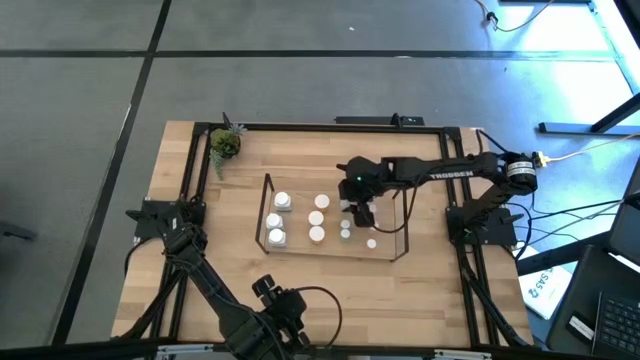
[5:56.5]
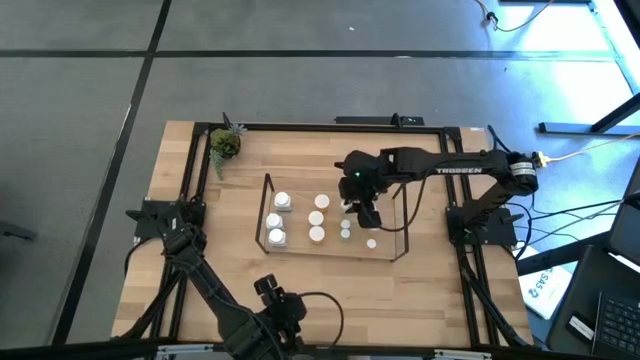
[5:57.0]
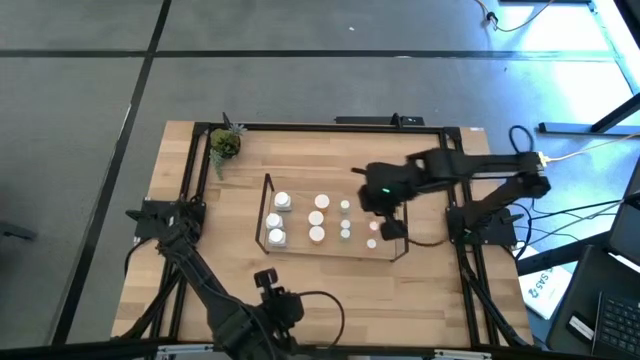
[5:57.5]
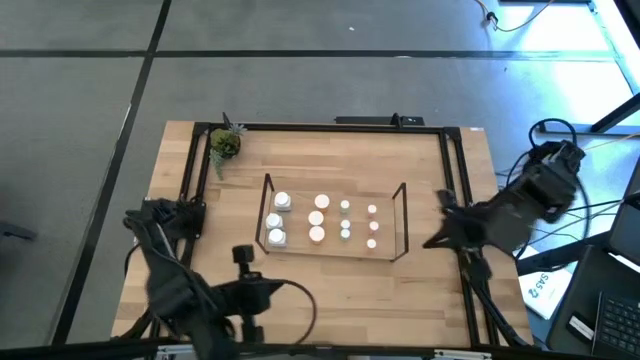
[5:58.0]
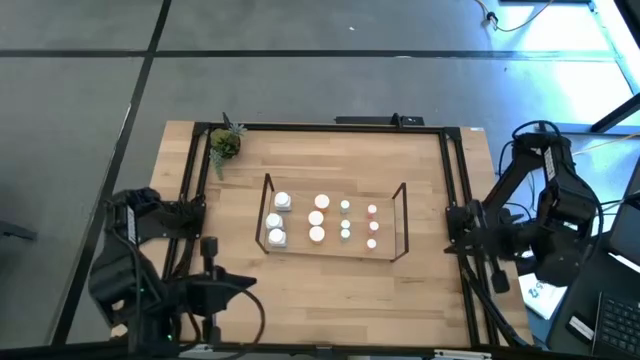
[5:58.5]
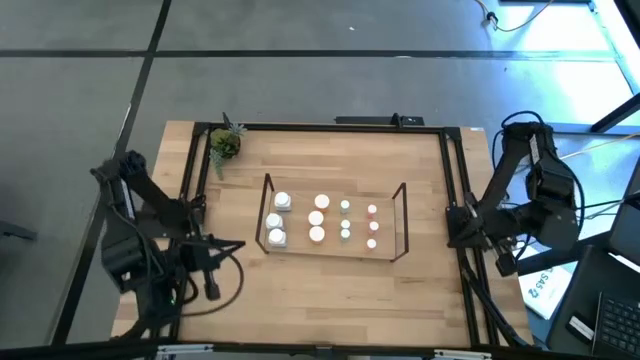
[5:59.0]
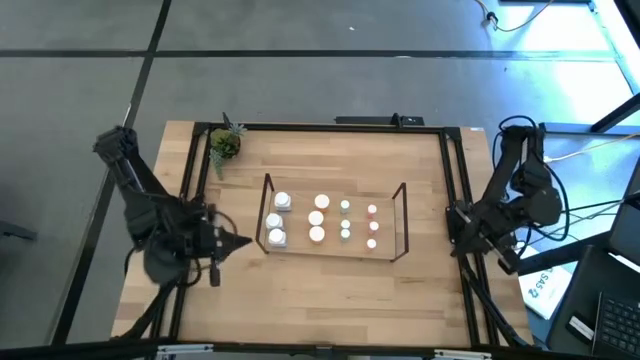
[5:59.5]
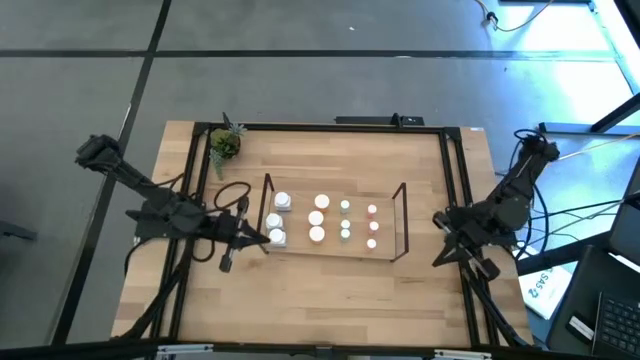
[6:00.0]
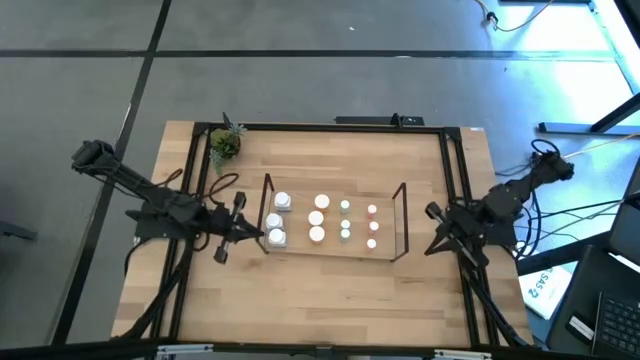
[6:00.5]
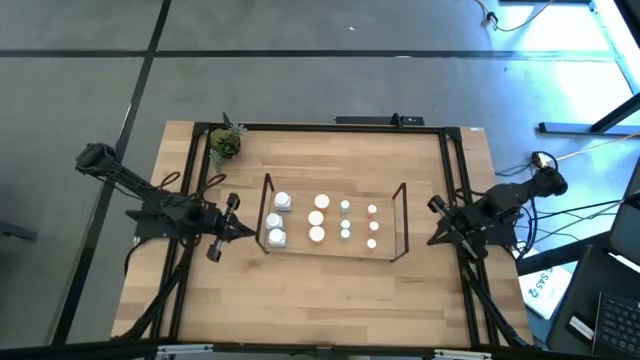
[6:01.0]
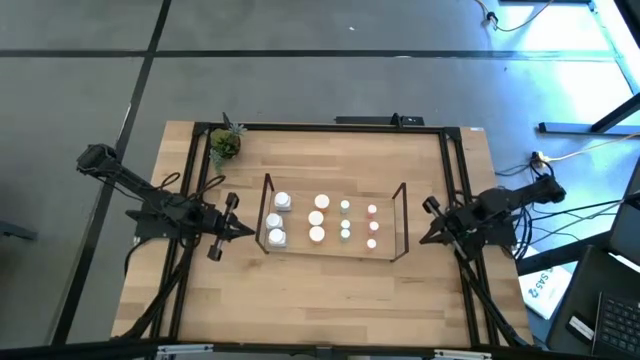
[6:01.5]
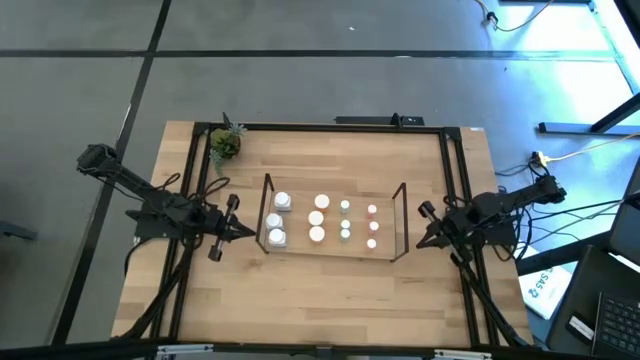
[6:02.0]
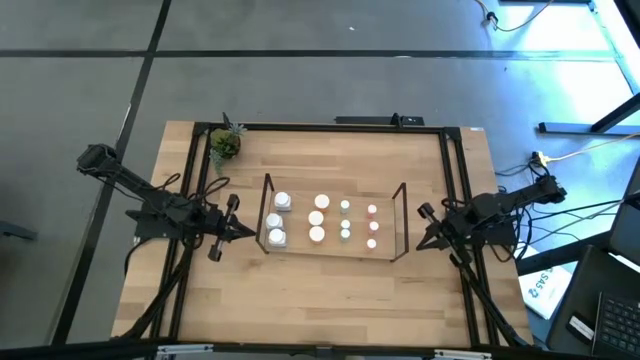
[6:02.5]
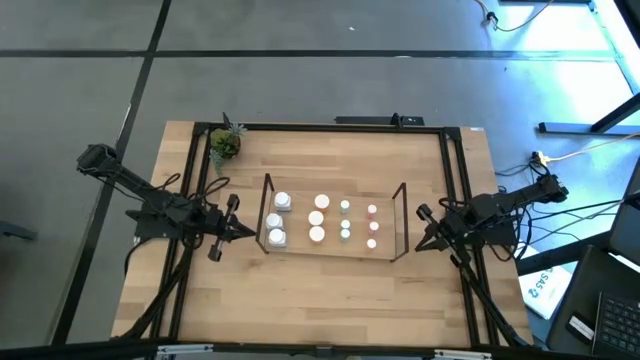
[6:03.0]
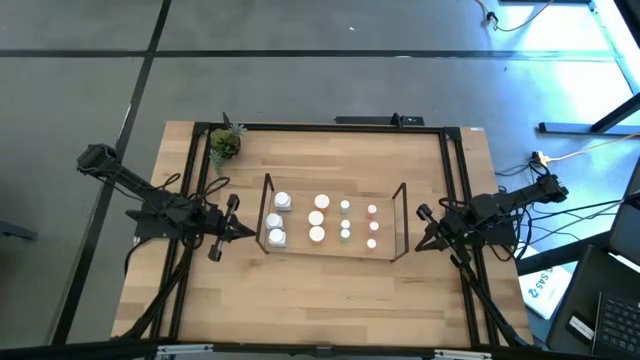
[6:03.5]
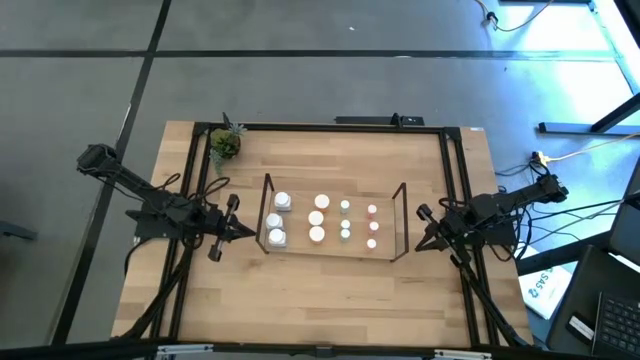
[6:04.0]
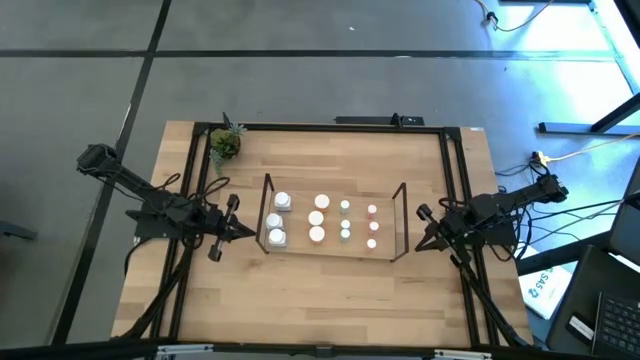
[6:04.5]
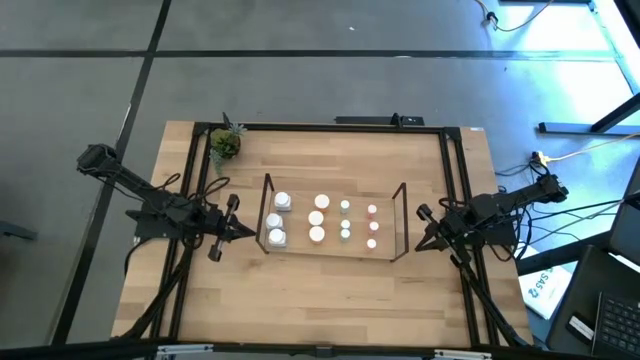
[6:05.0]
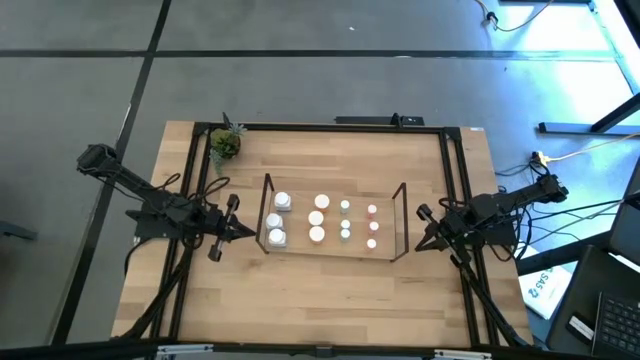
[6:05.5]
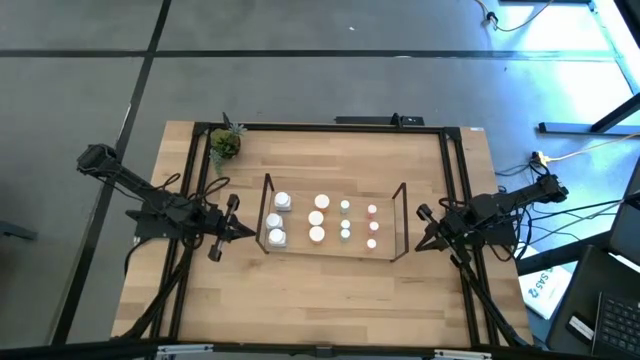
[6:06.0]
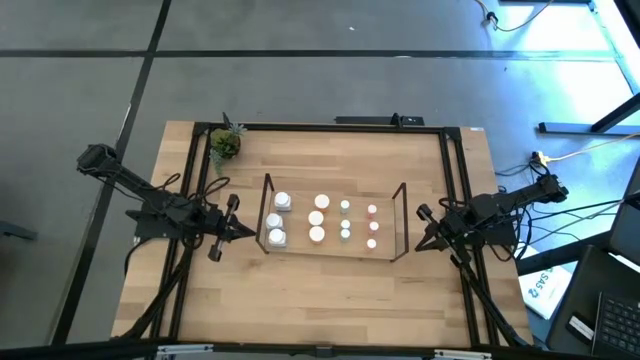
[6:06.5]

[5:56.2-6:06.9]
Task: Pick and place medicine bottles onto shelf by color
Return to Home Position

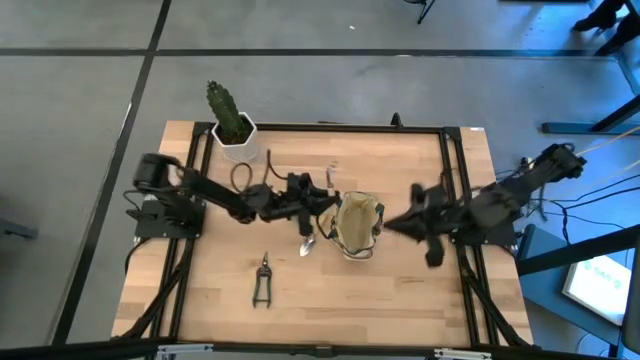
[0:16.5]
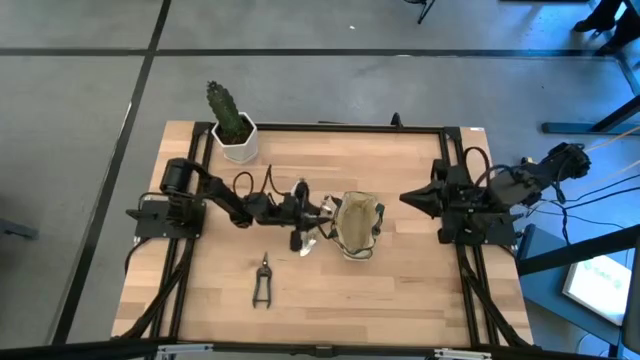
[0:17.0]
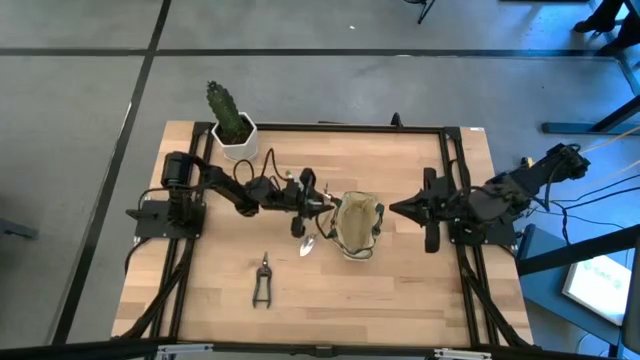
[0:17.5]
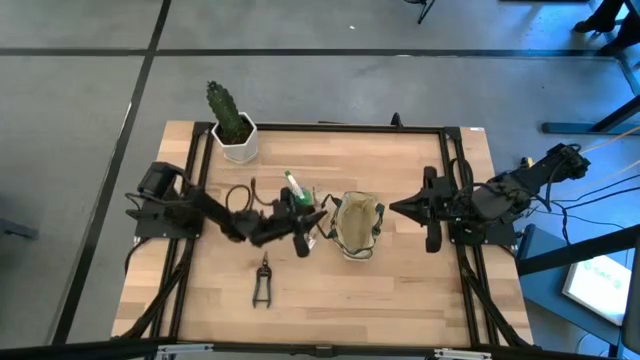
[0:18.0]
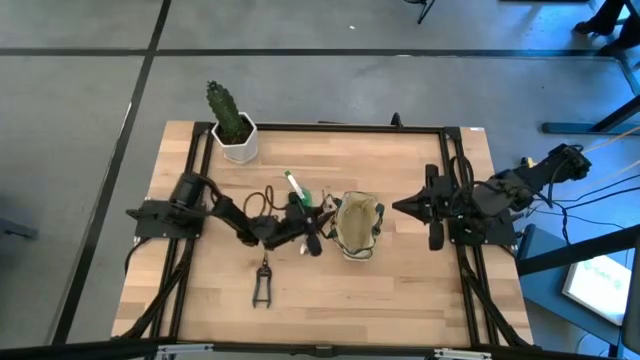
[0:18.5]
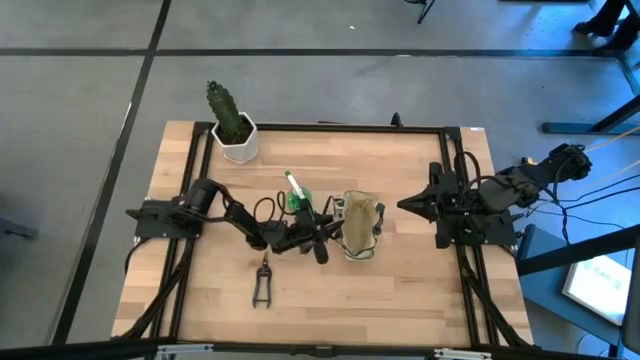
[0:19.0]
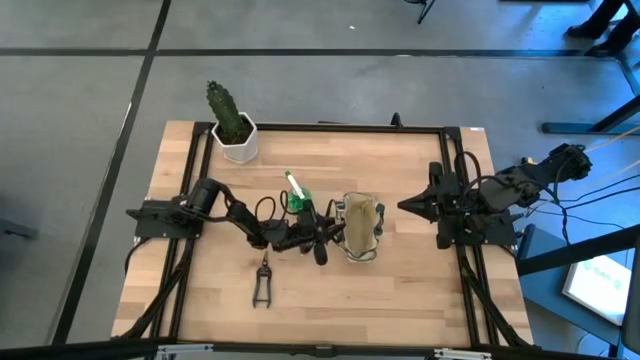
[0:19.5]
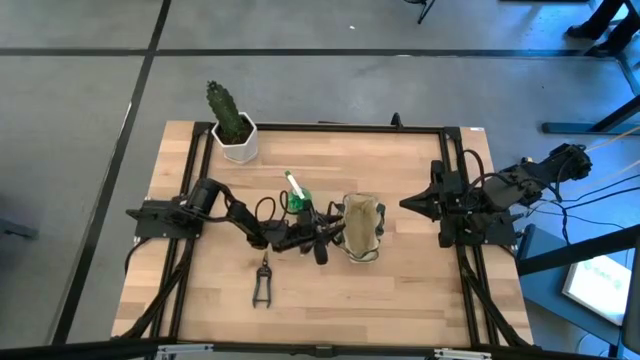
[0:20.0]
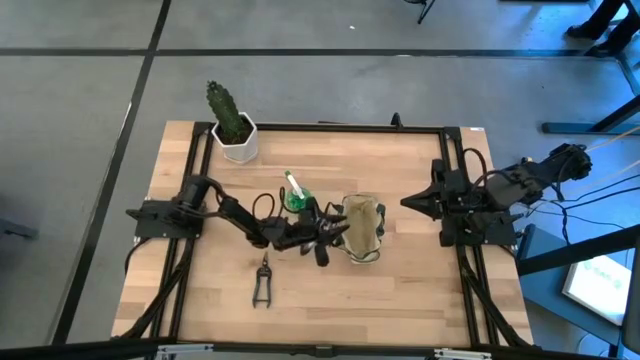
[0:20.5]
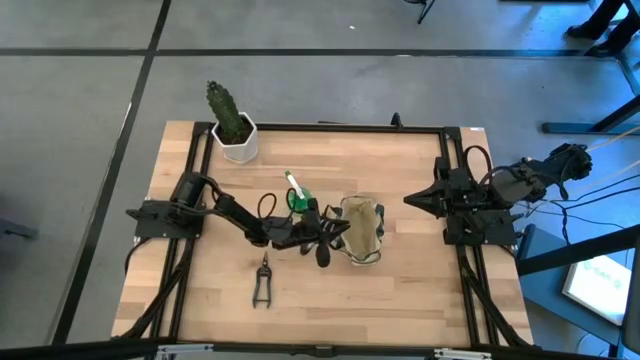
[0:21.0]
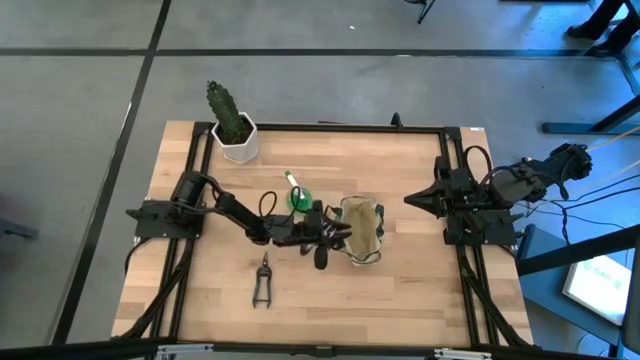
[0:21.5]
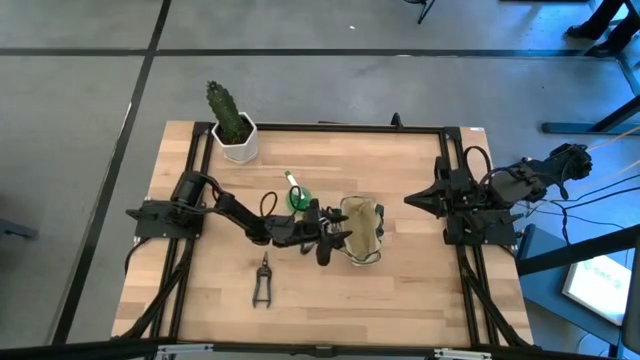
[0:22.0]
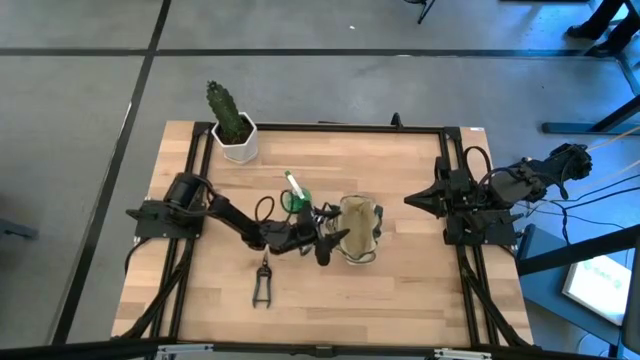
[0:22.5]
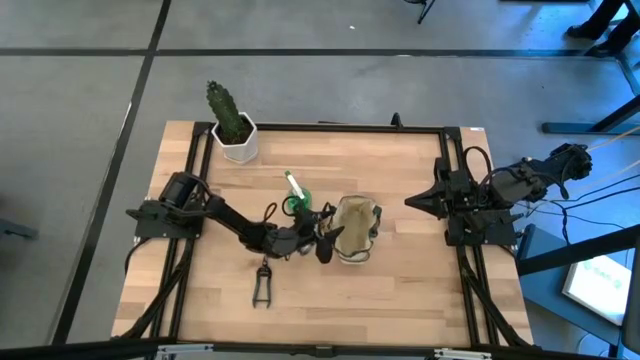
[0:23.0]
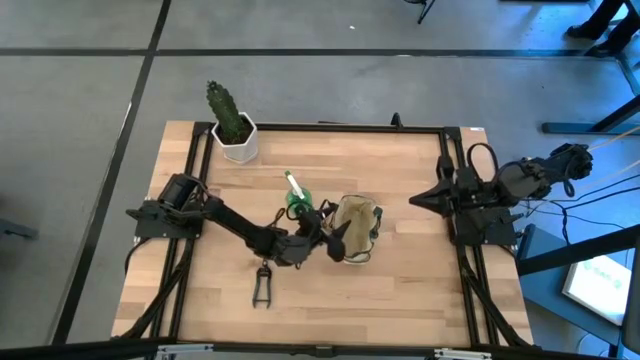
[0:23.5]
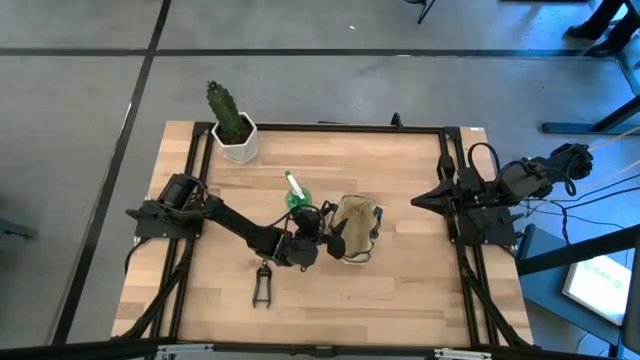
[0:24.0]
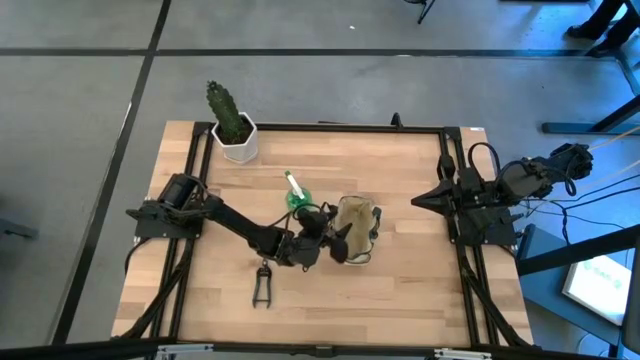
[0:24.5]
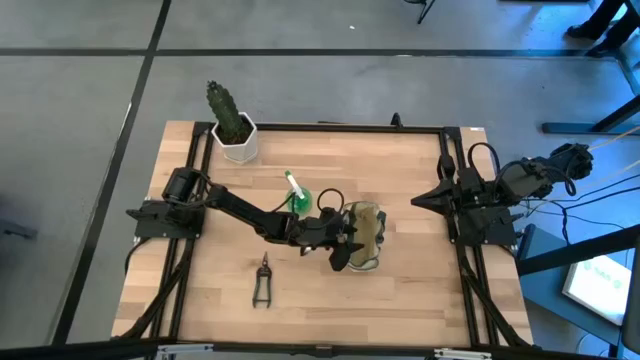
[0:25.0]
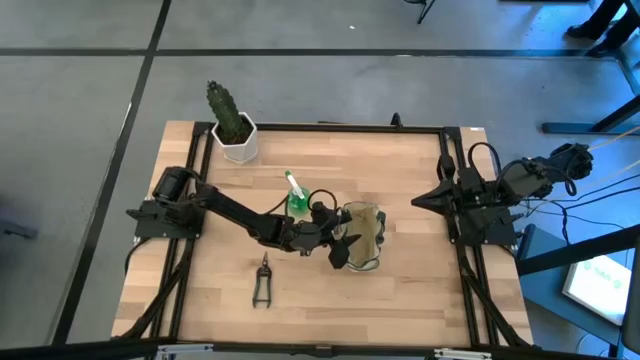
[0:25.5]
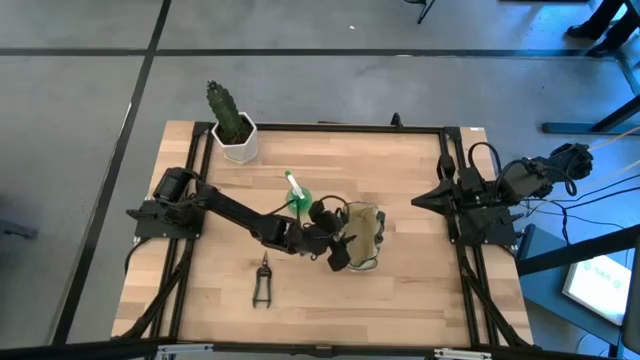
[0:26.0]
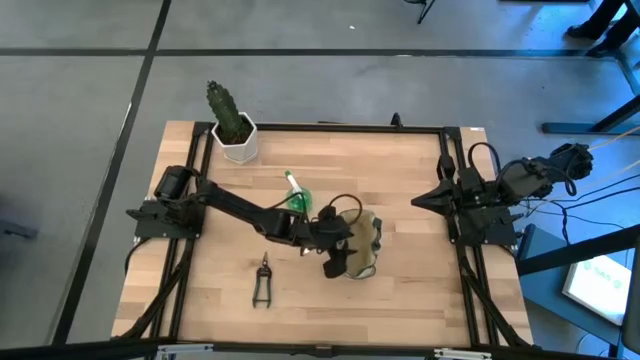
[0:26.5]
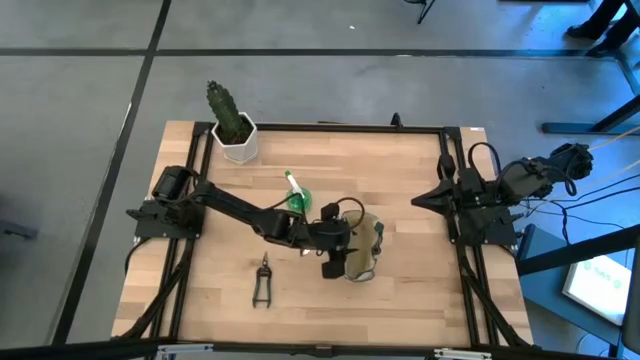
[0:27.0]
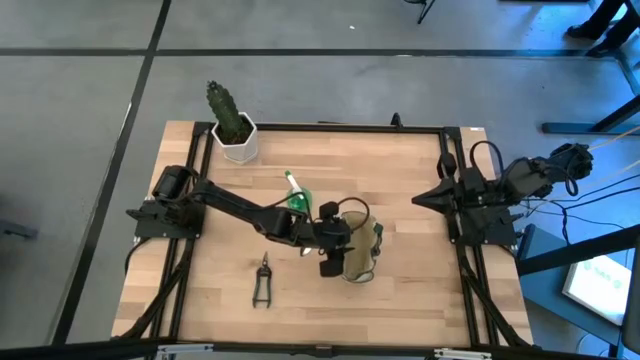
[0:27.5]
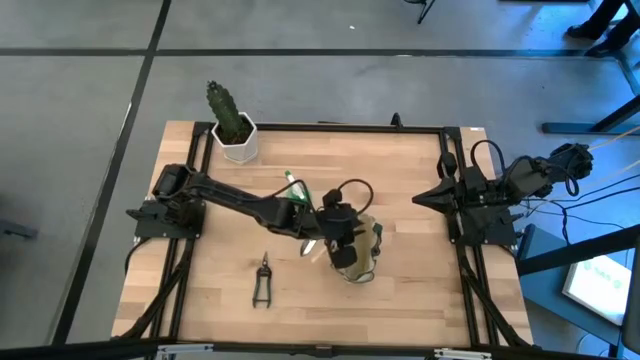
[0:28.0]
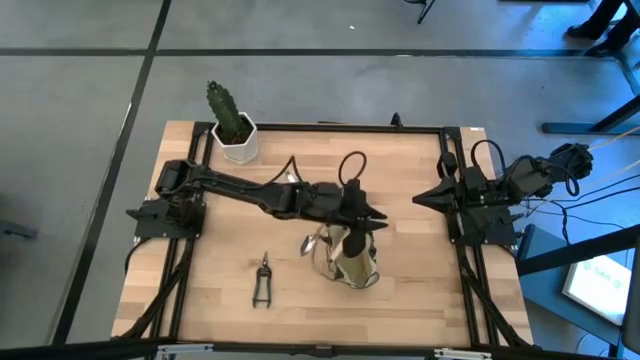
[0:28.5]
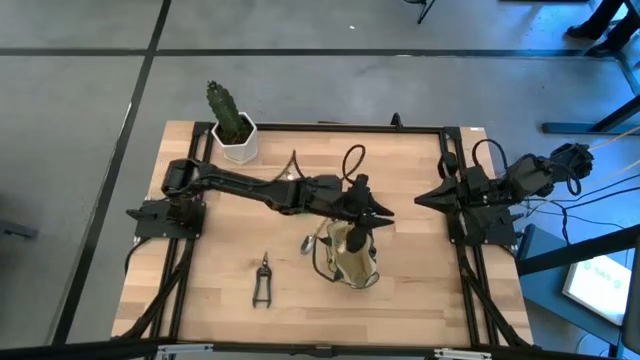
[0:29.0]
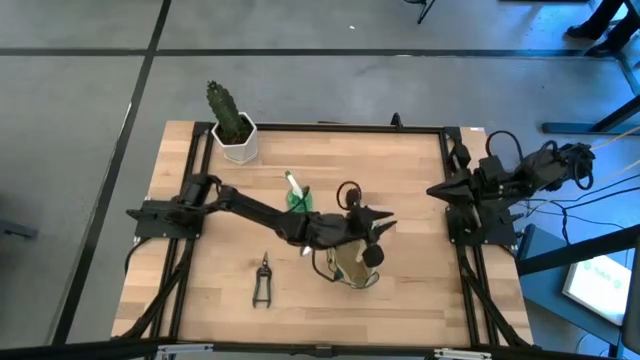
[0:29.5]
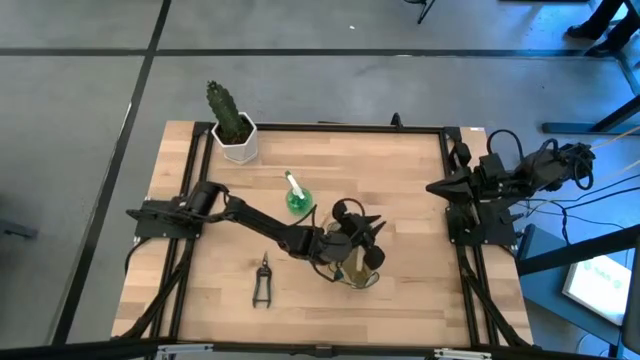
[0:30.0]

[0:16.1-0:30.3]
Task: Pick & Place Garden tools in Gardening bag
Put the brown hand rake into the light brown gardening bag
